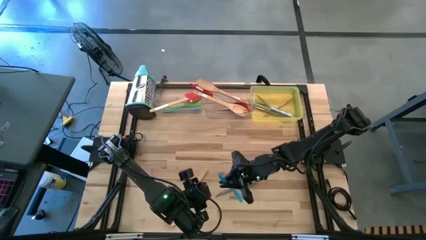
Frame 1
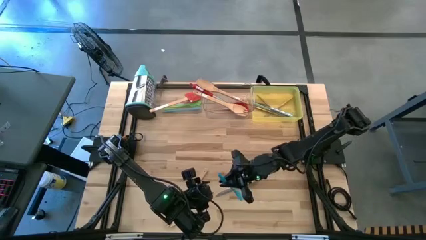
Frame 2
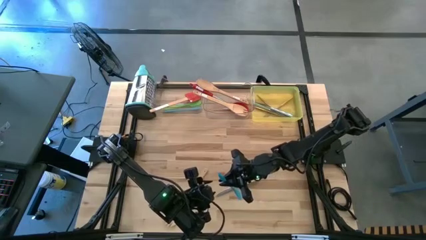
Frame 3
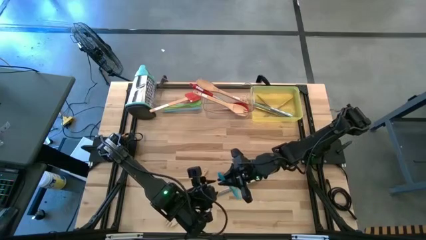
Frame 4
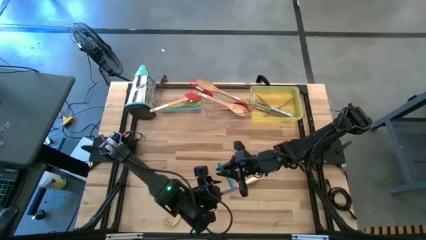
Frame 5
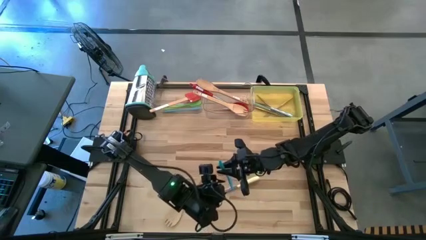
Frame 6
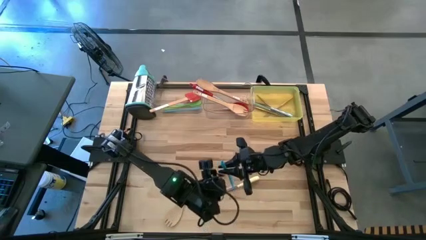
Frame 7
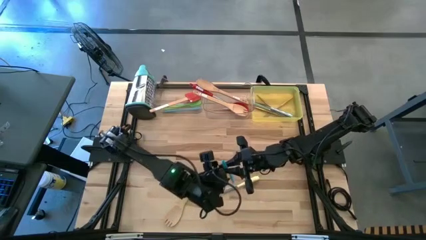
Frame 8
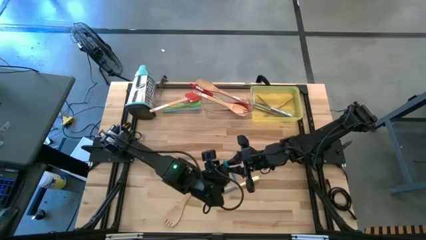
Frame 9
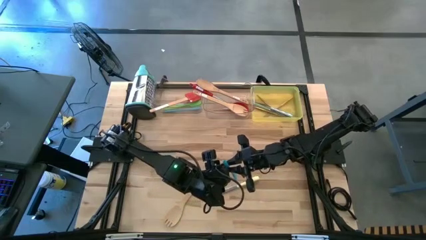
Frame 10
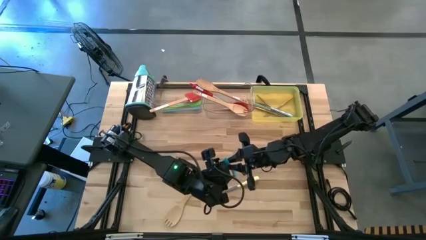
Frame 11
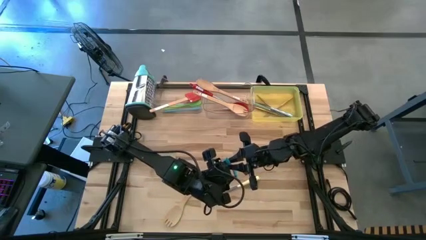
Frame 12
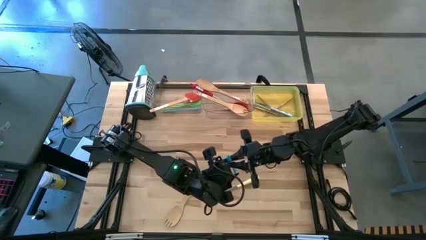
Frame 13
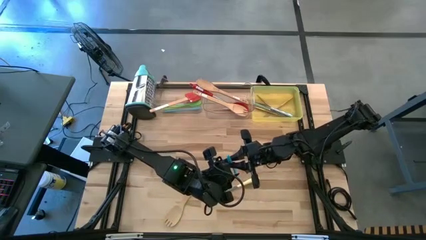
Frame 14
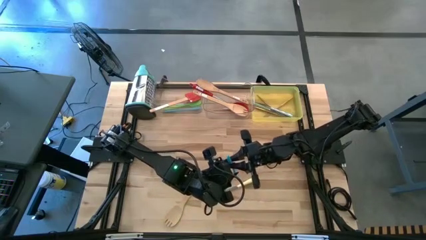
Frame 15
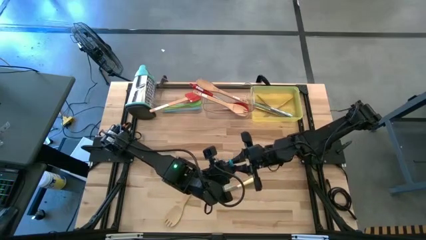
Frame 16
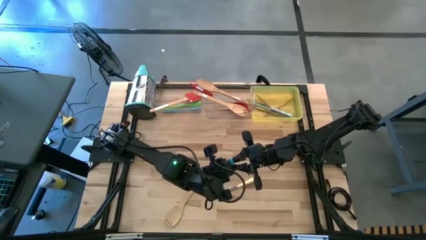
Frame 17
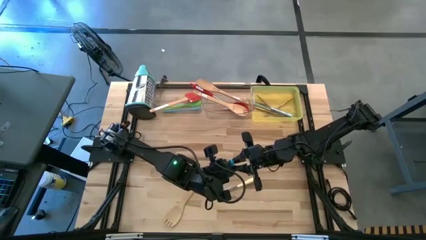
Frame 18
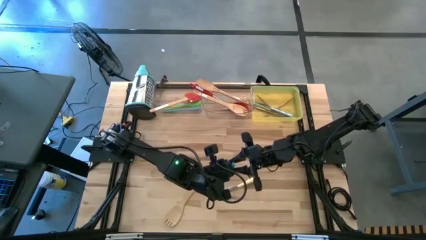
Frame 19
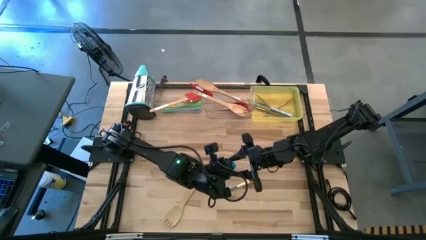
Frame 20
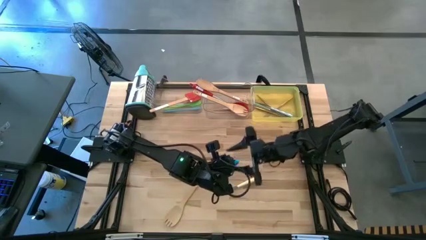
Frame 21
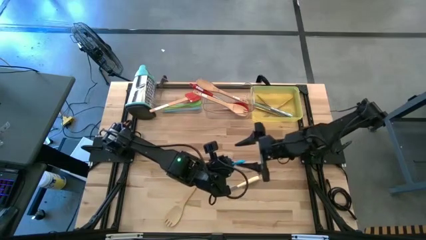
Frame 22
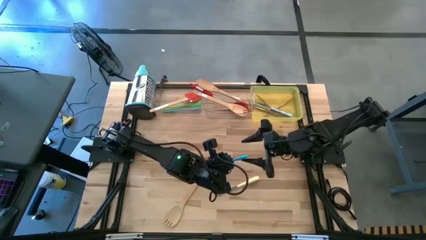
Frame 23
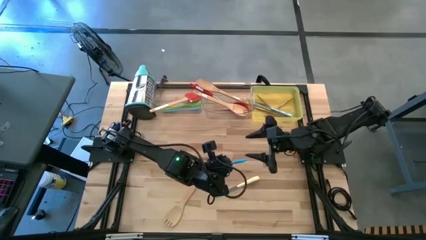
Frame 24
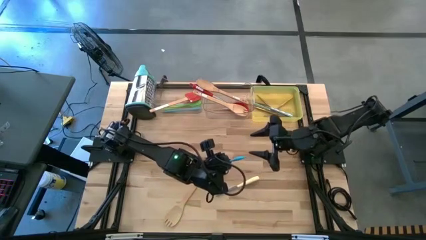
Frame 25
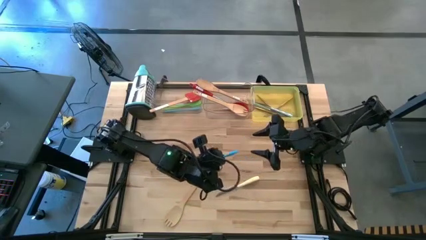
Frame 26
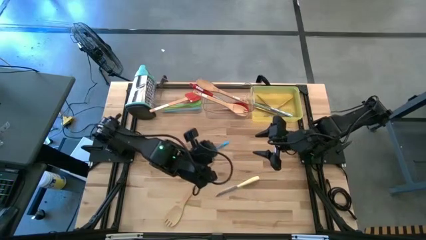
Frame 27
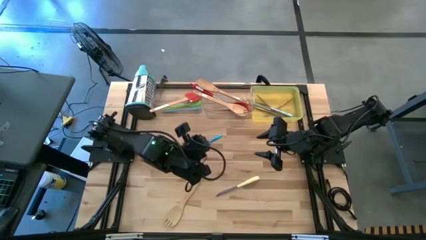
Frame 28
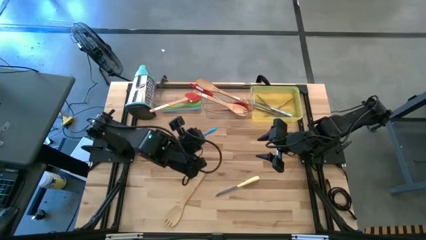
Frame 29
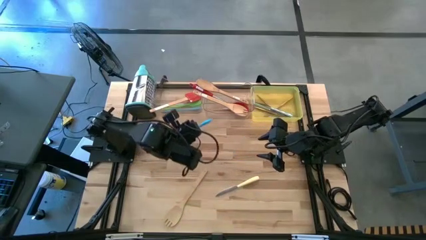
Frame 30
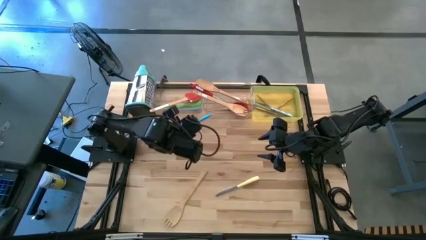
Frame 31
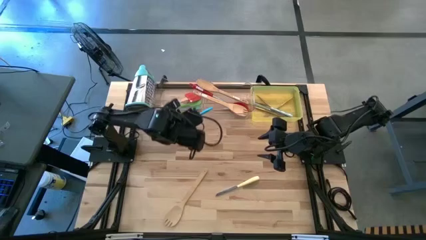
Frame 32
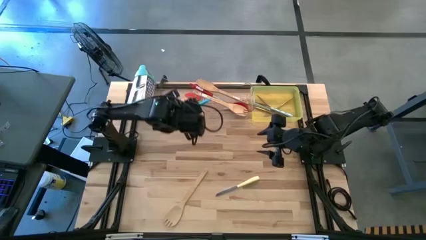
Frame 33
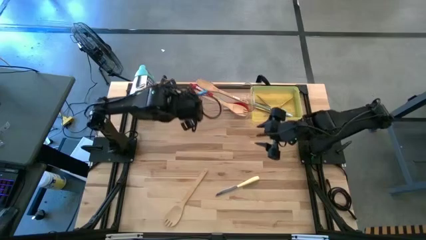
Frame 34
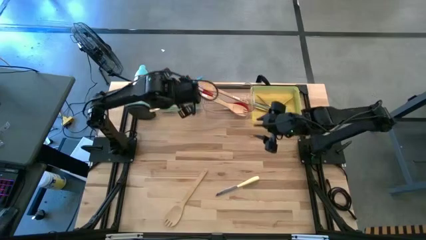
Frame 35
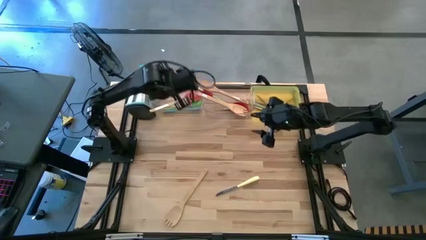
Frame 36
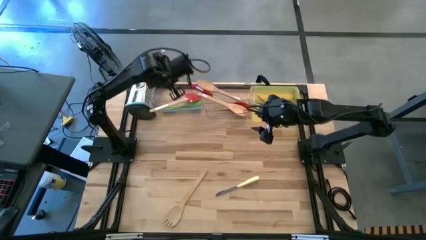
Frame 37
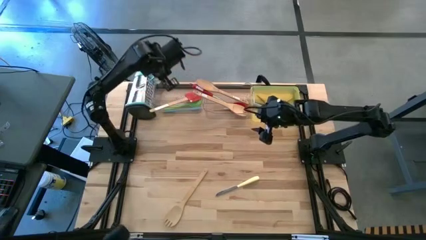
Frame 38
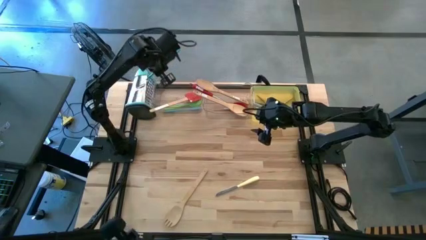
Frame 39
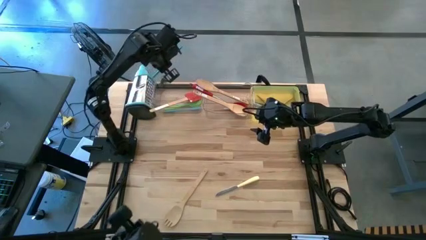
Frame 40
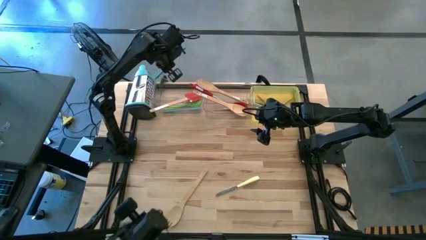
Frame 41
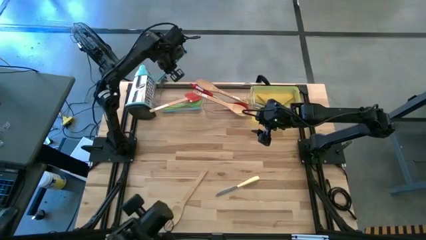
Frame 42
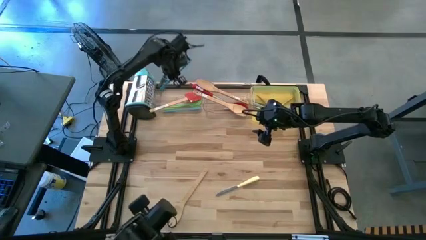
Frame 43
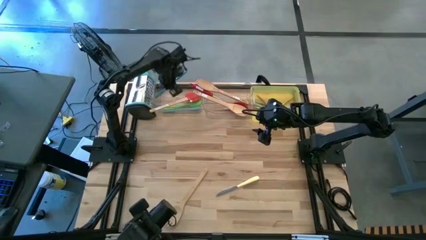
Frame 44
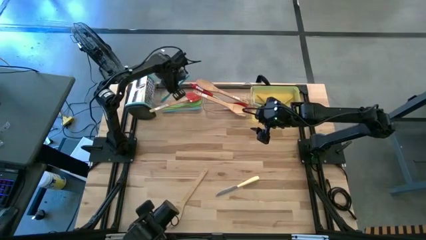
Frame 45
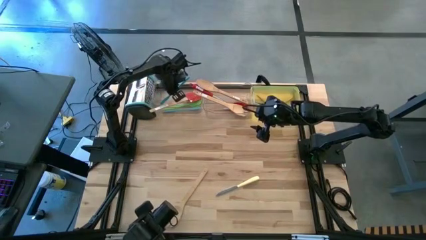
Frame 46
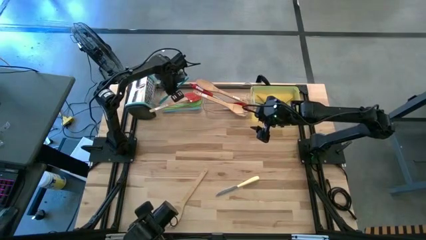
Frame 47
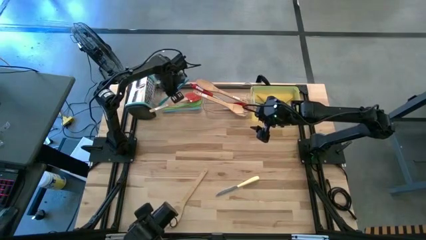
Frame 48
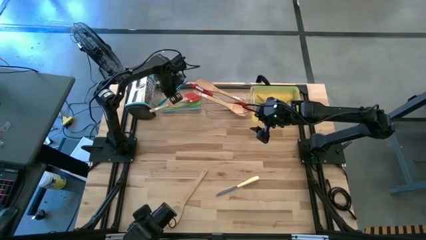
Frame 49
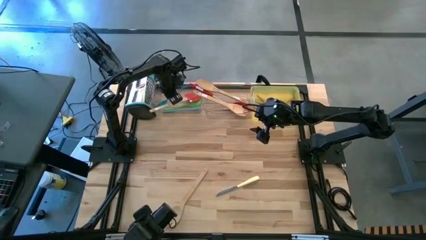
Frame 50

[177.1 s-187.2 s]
Task: Pick & Place Kitchen Items
Put the blue spatula into the left transparent bin

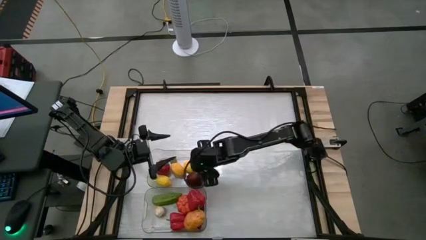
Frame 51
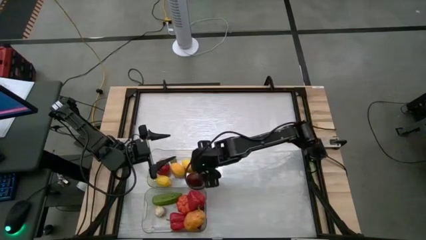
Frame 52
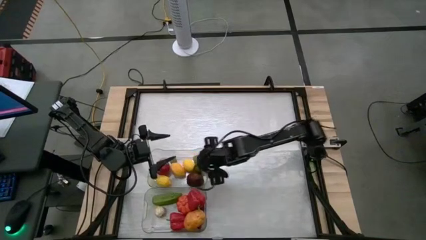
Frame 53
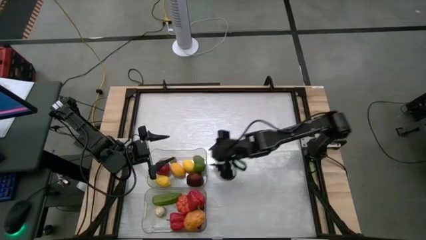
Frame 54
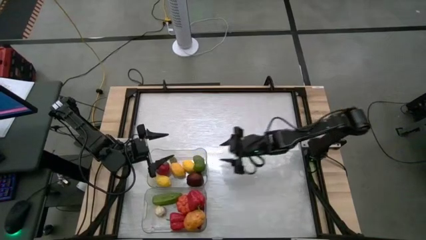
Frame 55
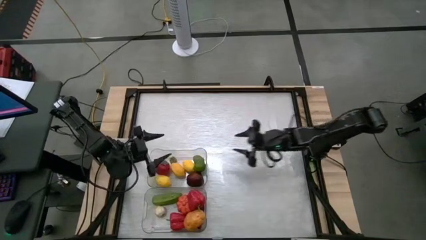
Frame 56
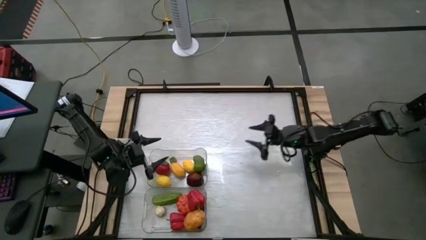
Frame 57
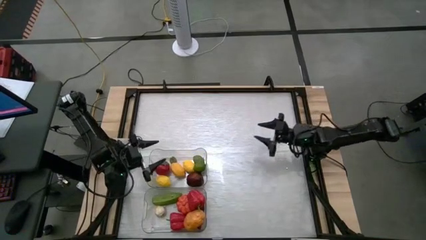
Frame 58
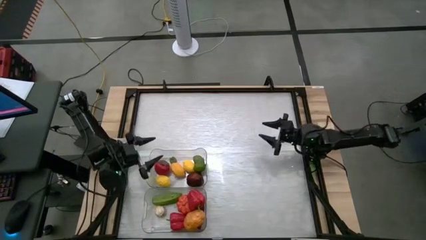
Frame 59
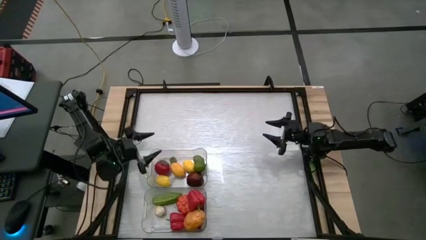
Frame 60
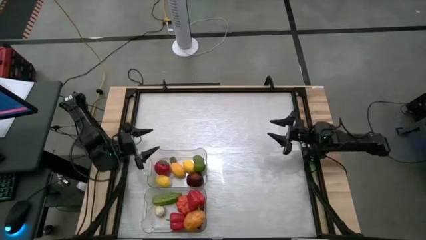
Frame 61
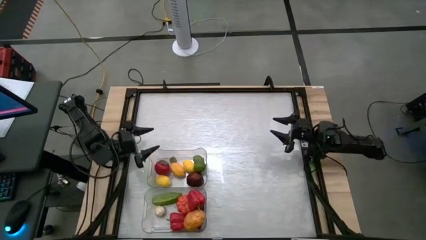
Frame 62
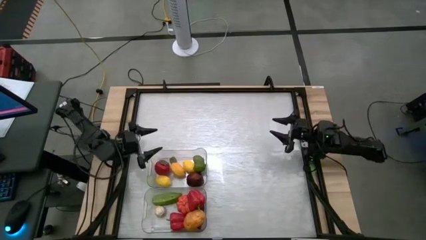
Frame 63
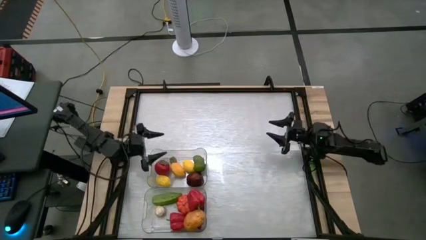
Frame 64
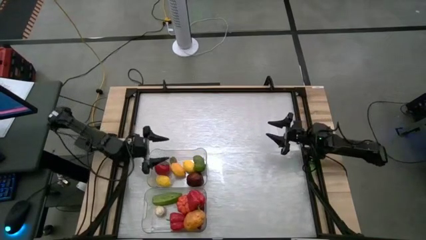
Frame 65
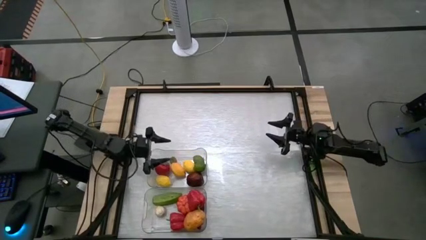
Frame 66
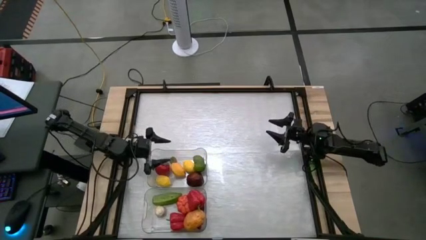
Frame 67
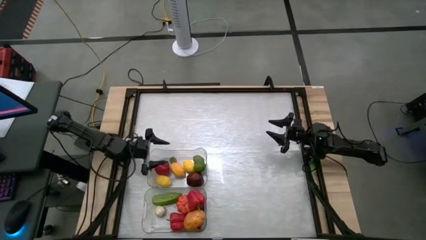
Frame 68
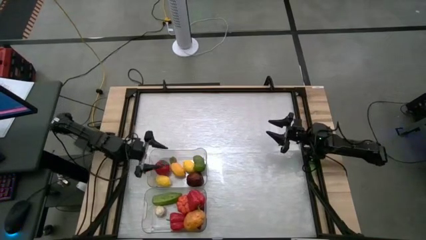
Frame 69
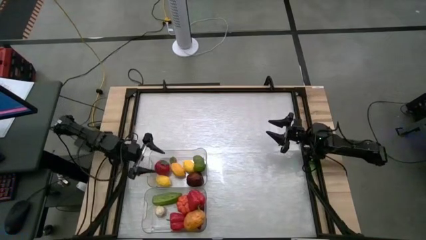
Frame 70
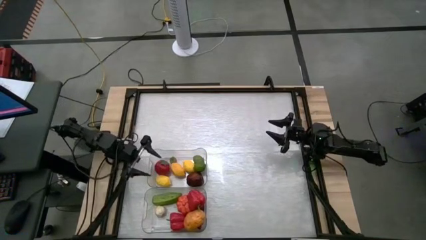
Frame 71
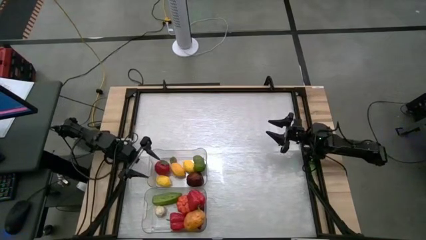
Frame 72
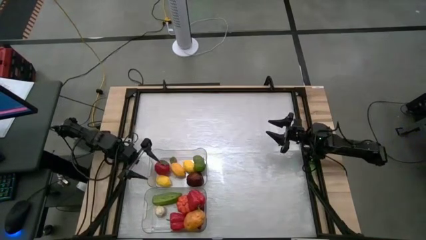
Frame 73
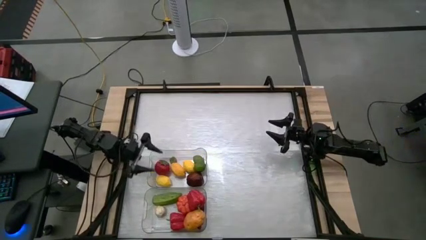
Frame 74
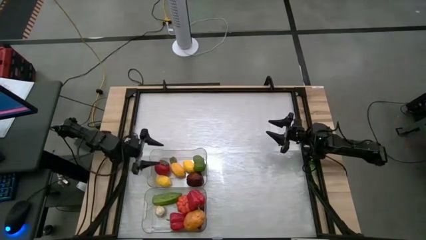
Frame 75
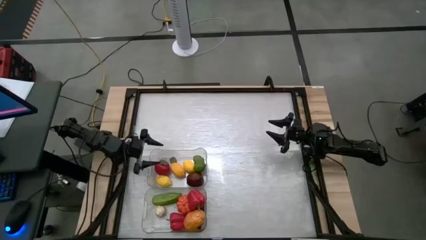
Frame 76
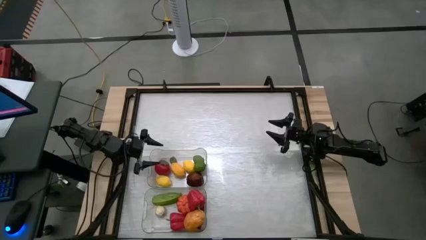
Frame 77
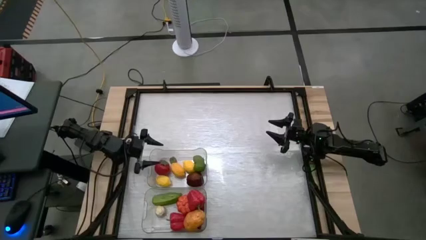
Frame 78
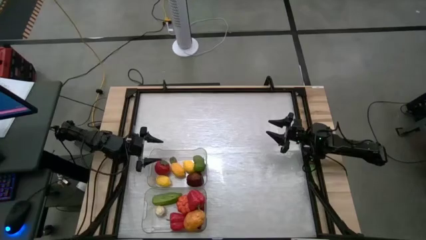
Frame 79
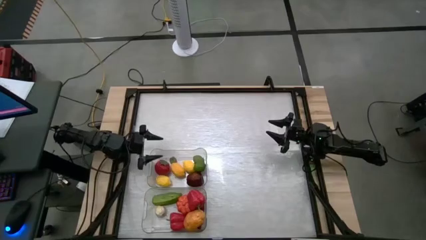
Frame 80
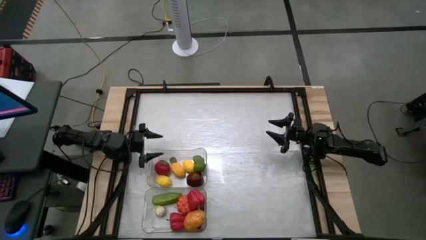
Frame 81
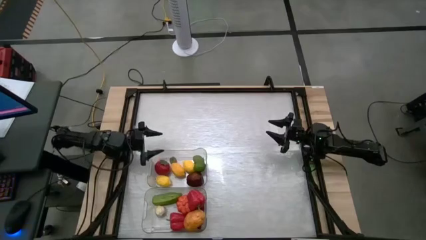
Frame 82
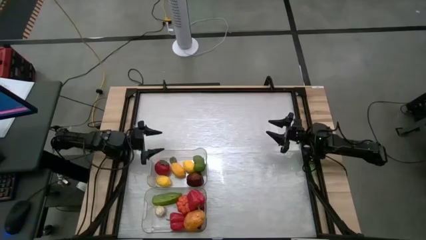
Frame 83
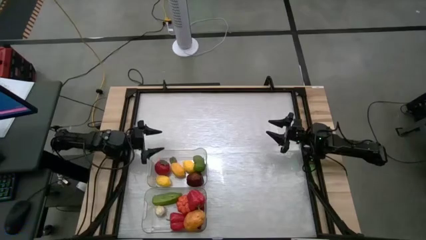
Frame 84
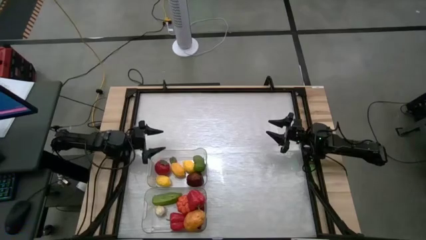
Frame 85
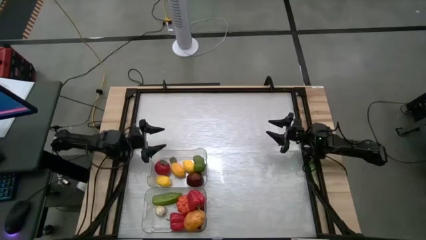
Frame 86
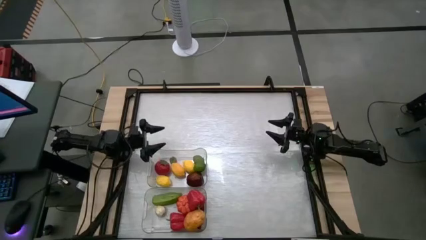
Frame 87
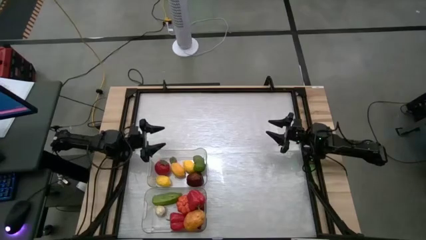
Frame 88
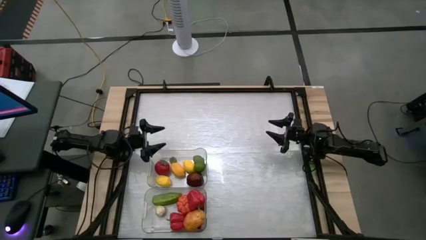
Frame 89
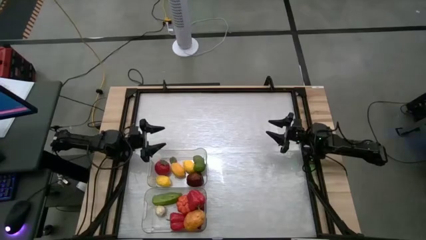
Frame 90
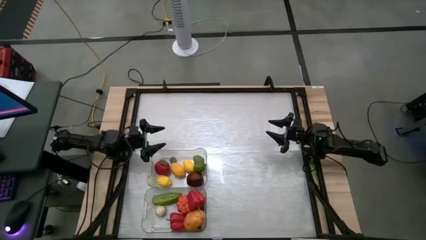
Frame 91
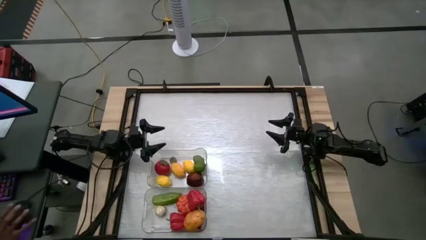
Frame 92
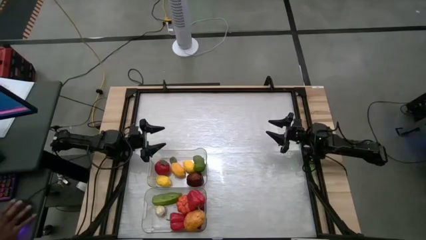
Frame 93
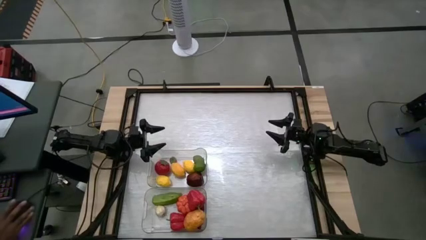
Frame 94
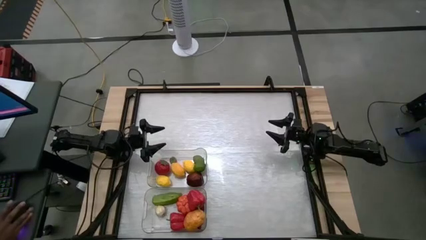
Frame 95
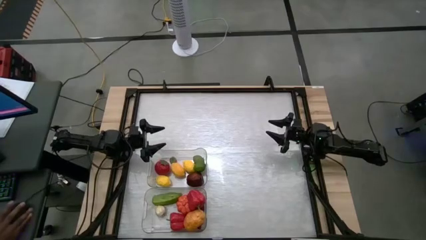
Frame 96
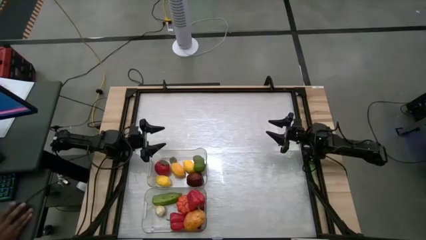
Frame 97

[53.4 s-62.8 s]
Task: Sort produce into baskets
Return to Home Position
